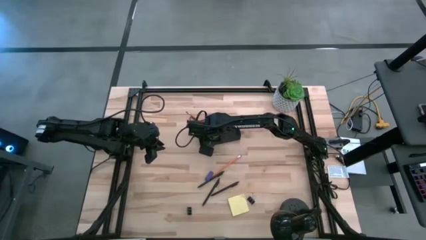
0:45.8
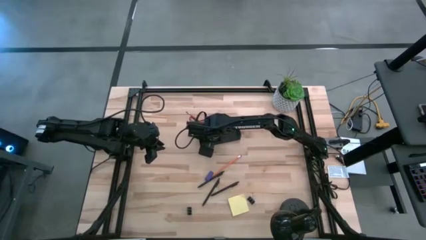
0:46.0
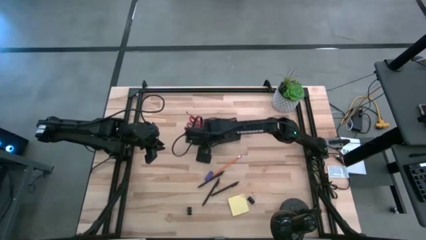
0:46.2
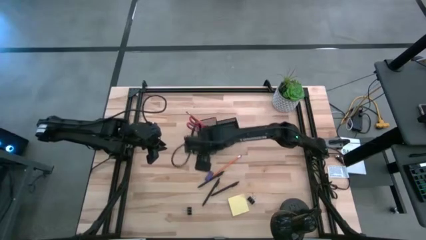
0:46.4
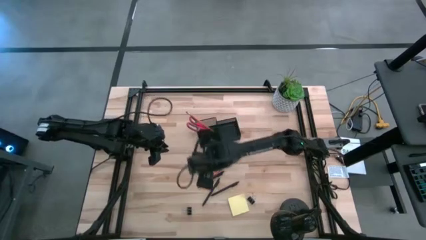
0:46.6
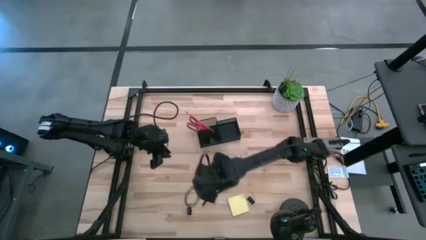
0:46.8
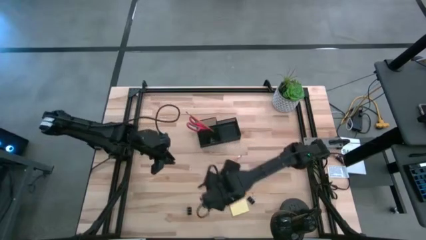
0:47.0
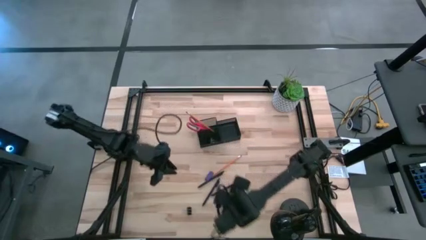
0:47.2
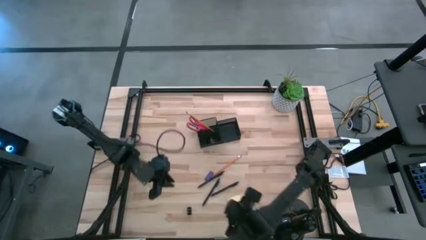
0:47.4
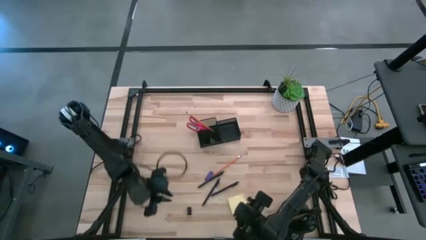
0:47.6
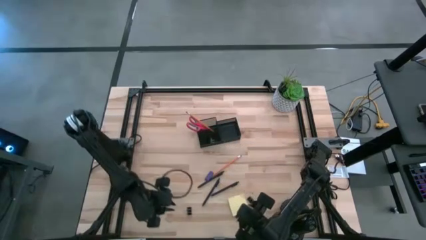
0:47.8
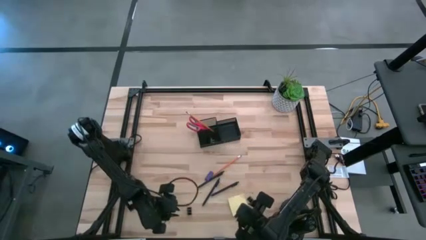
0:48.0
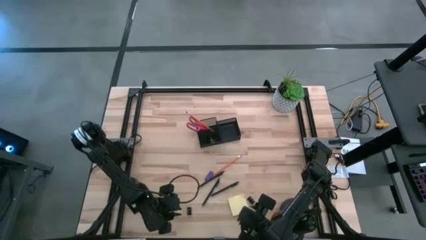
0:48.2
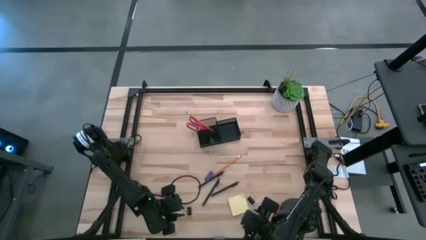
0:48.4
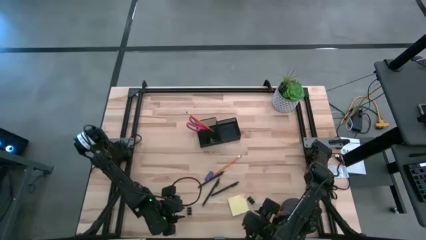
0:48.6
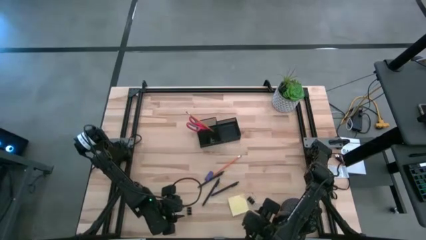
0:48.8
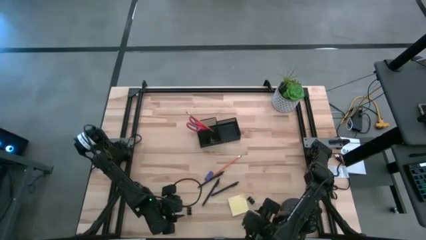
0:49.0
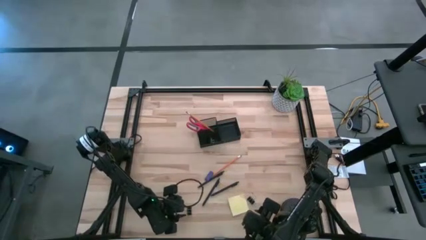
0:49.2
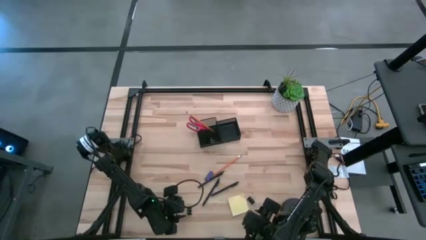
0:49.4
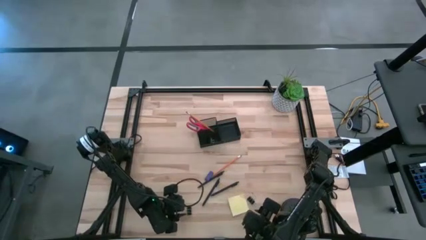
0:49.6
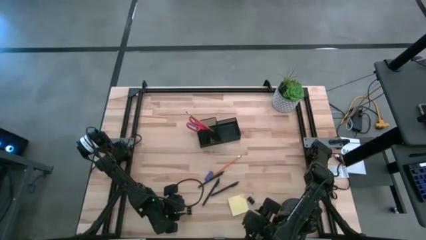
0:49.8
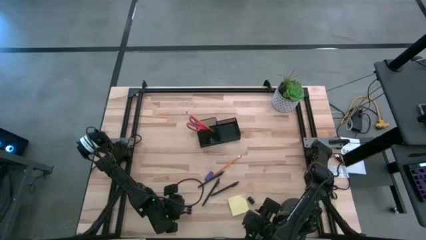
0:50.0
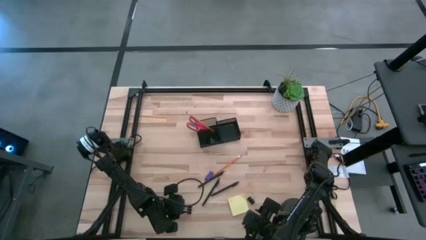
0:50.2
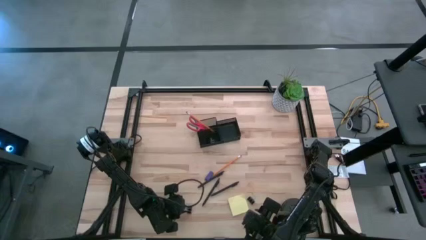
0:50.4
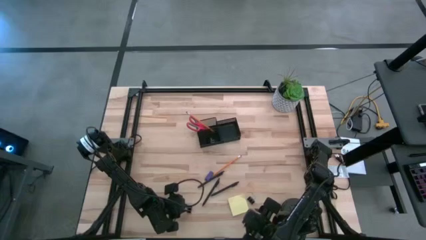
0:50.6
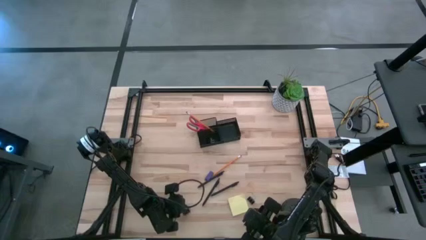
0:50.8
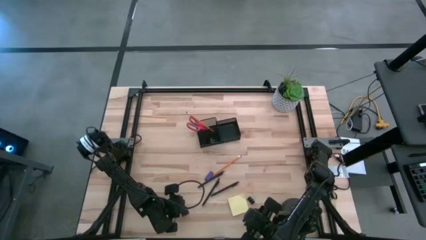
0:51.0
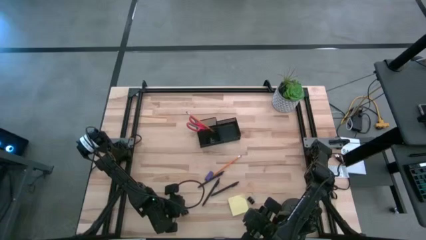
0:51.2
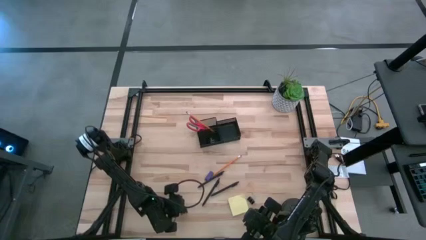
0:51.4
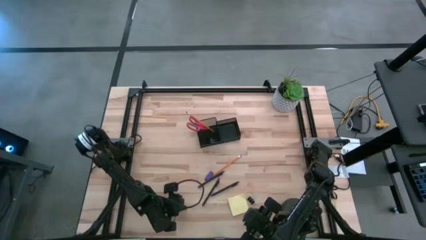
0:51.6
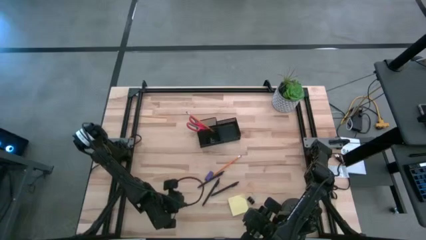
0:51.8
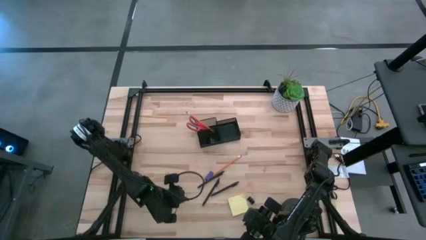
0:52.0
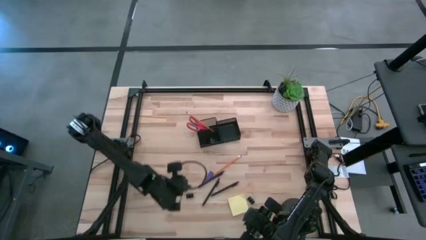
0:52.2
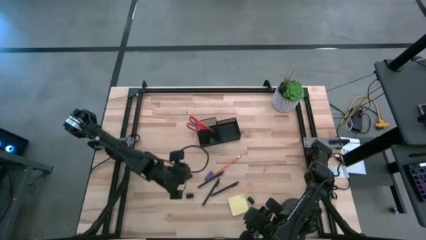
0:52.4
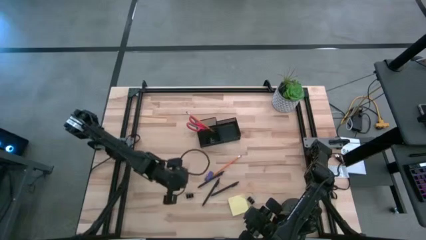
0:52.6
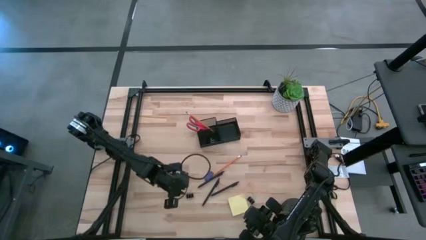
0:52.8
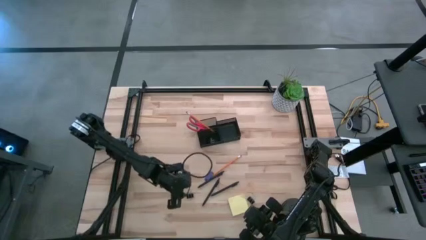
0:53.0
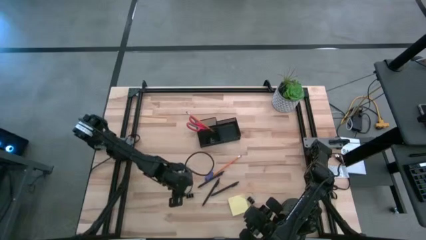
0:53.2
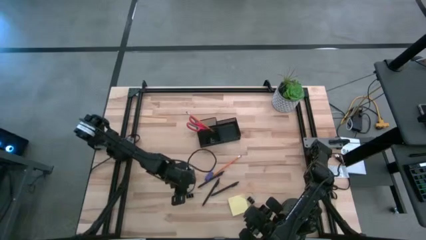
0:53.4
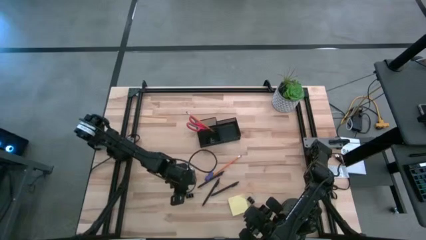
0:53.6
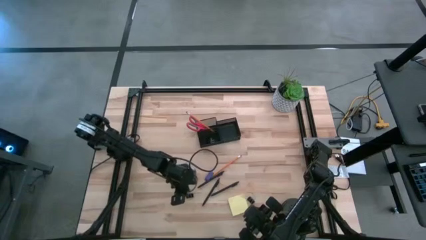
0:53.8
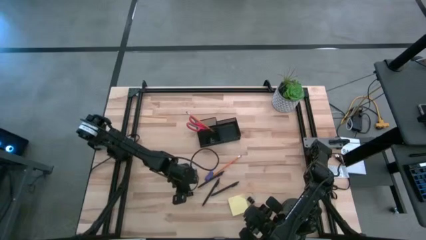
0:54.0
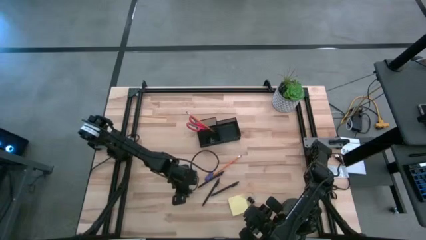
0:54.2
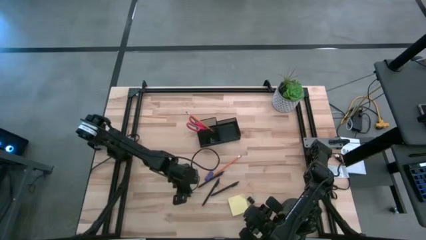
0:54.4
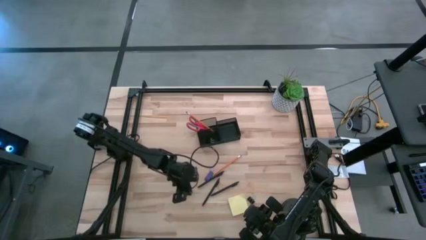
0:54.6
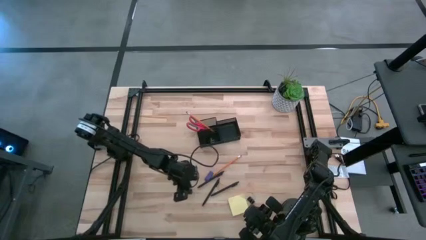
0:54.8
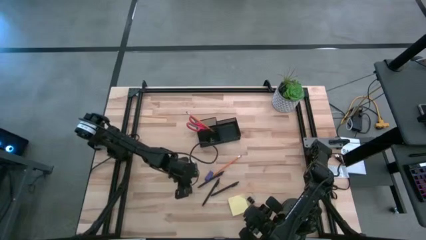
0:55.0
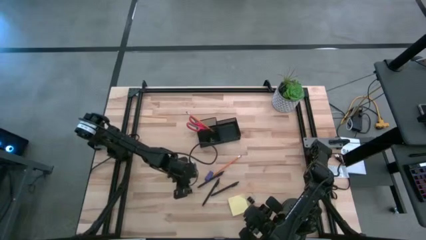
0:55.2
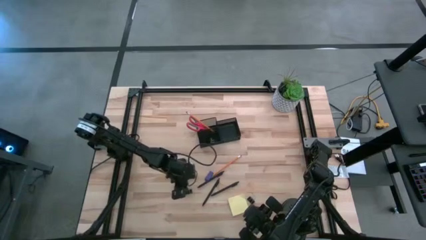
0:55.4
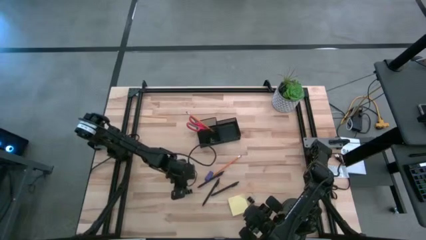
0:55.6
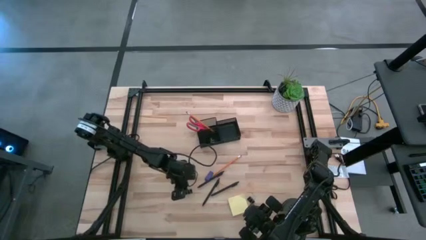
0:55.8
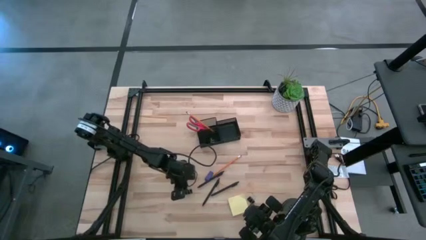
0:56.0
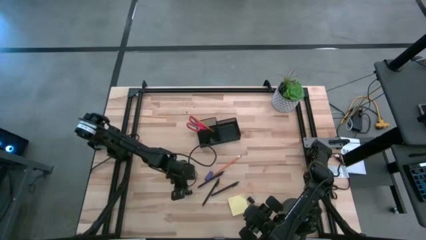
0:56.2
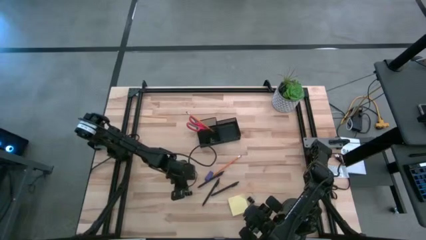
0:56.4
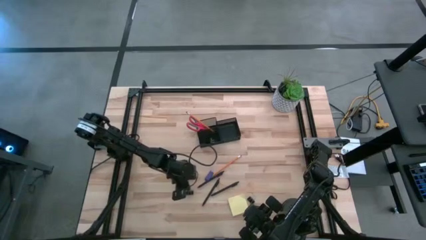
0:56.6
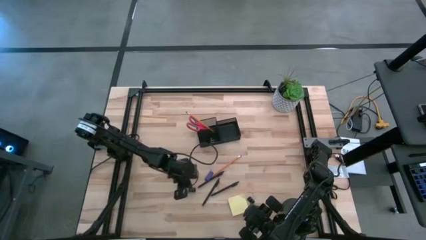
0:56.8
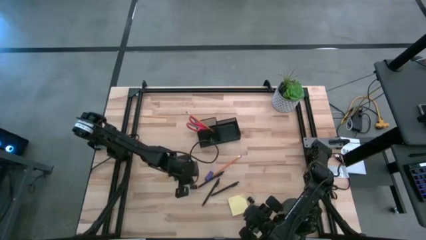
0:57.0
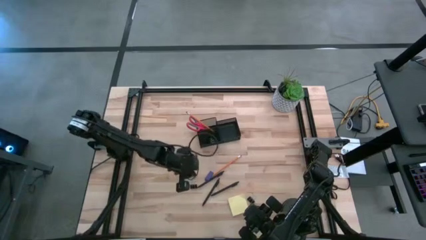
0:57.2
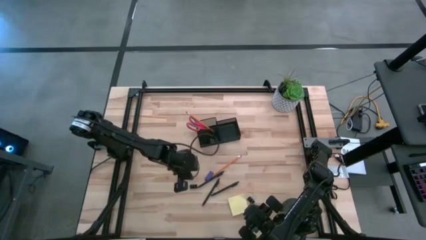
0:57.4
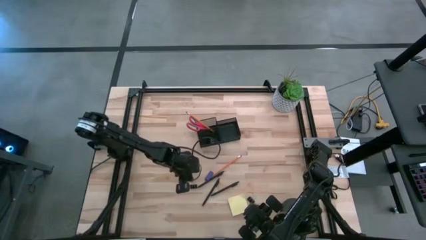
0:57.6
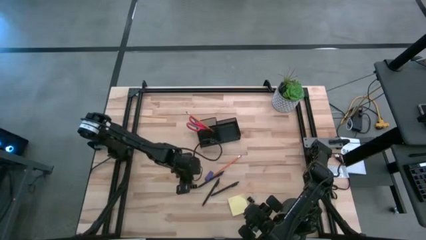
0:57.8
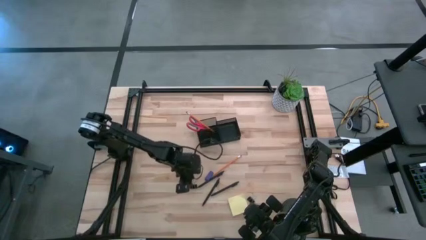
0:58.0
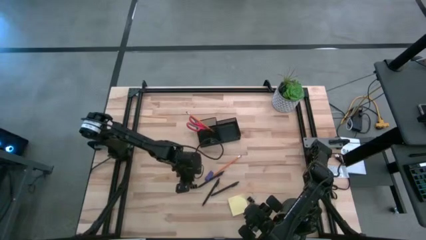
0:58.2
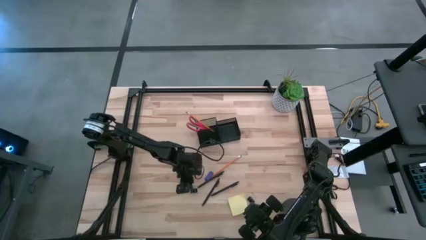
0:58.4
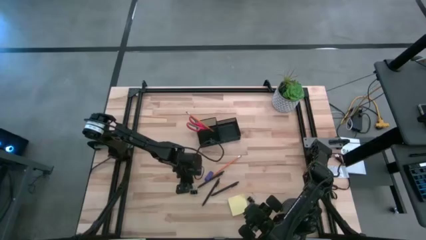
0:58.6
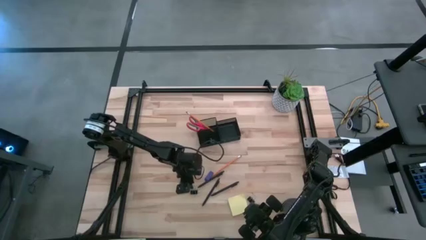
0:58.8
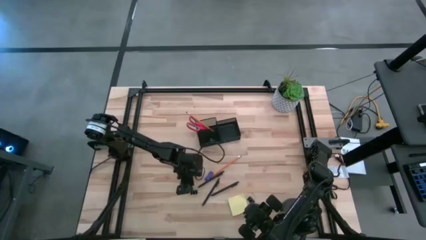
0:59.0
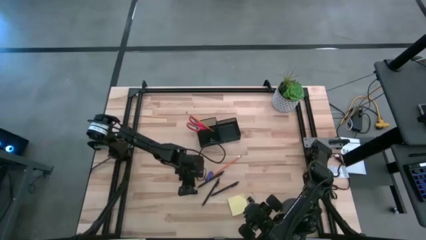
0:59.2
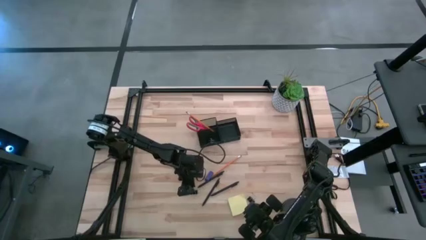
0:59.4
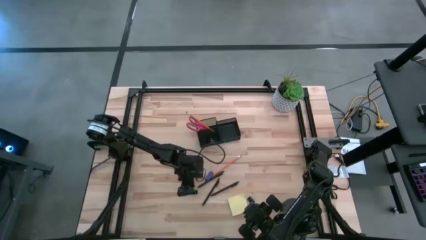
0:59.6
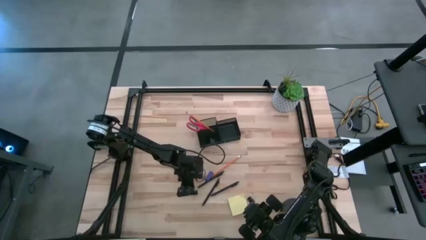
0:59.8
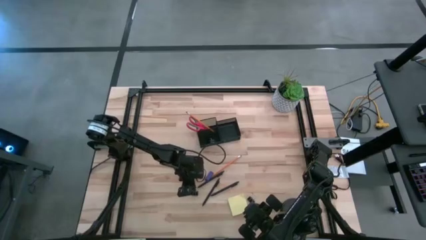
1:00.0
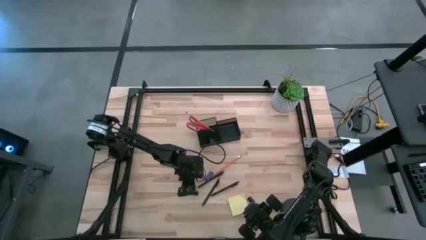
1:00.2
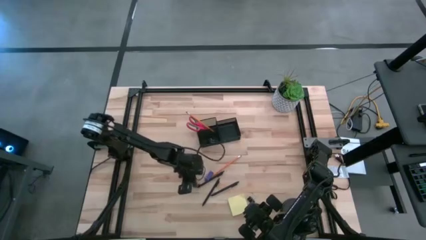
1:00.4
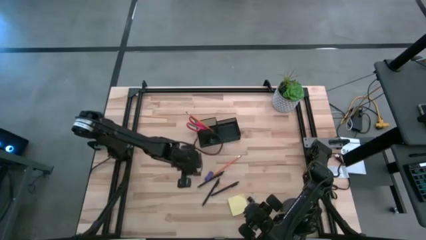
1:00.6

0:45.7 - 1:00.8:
Task: Pick and place office supplies into organizer
Put the left binder clip into the bottom left section of the desk organizer

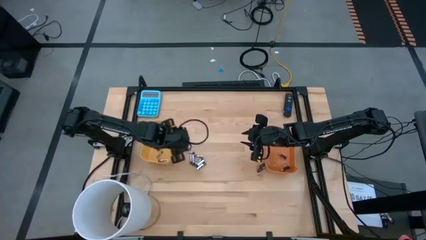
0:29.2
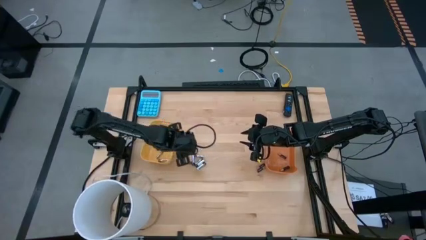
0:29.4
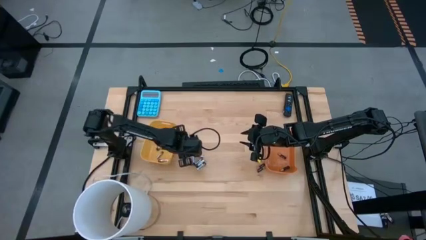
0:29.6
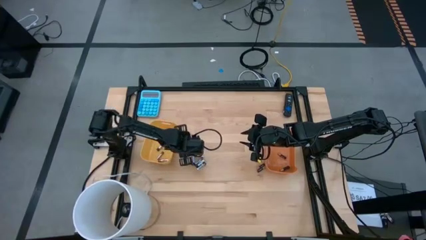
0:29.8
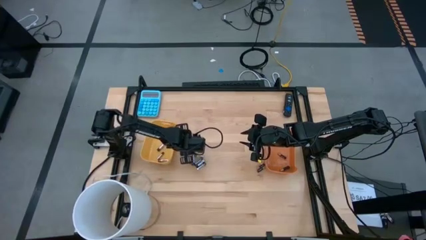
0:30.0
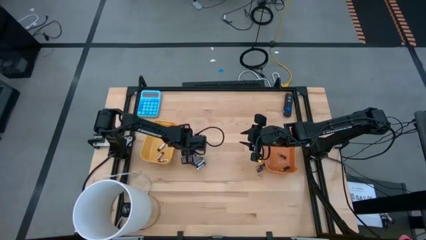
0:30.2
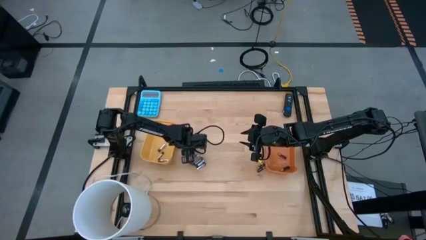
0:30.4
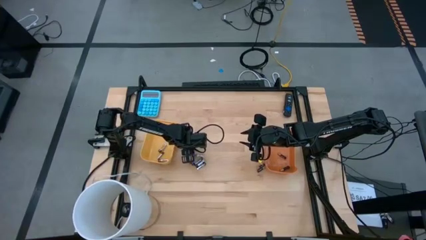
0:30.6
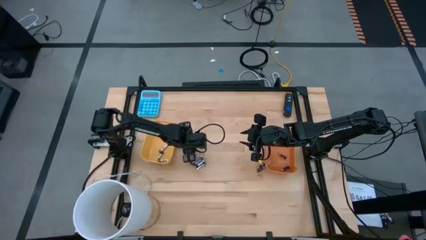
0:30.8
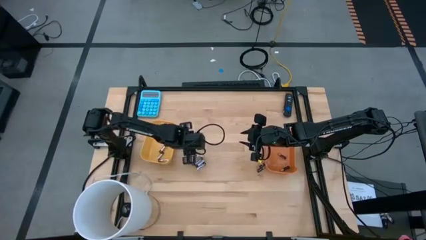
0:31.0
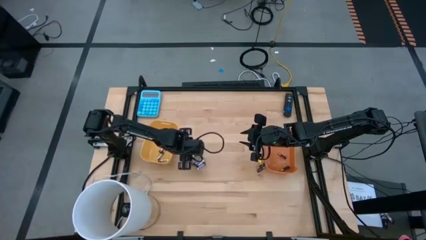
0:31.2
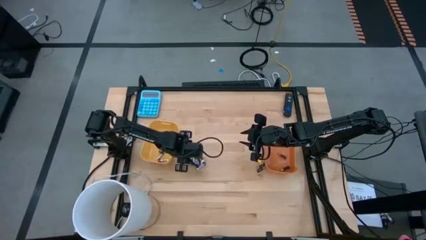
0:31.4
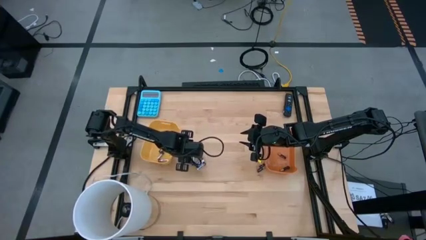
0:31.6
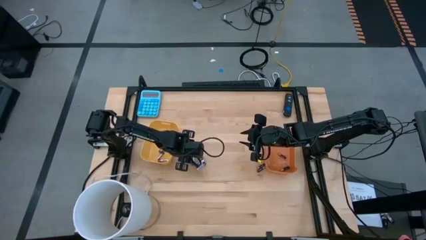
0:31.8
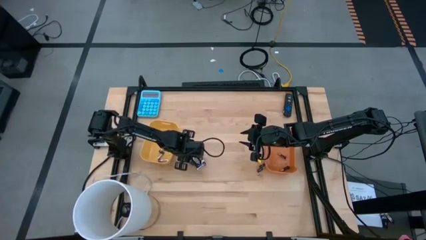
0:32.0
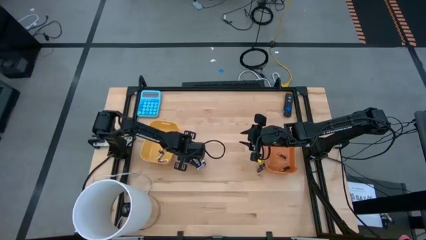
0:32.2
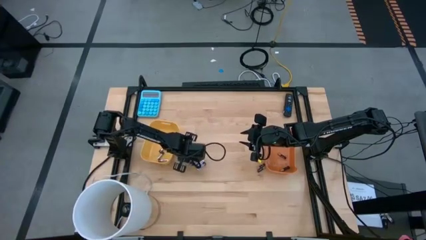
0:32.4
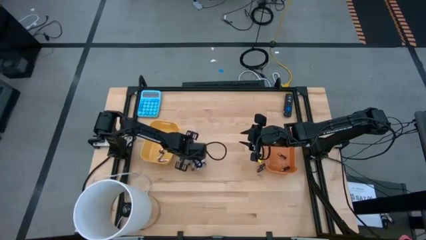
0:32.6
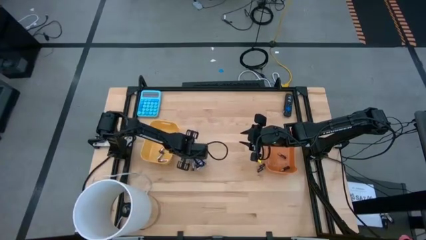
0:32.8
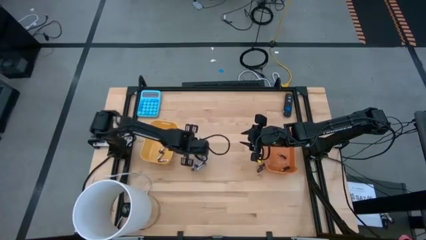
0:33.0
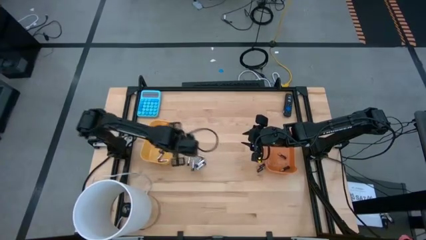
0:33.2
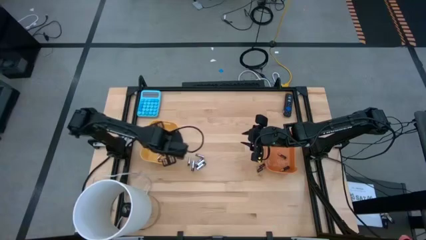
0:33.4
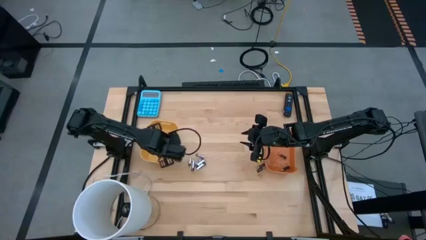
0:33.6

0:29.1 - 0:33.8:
Task: Sort batteries
Put the silver battery into the yellow bin
